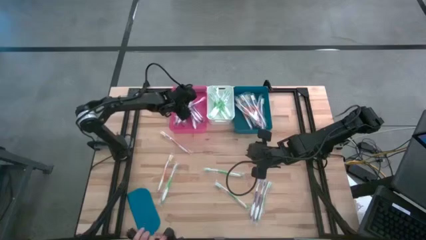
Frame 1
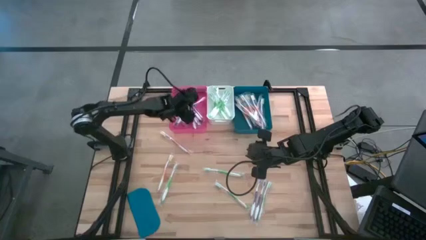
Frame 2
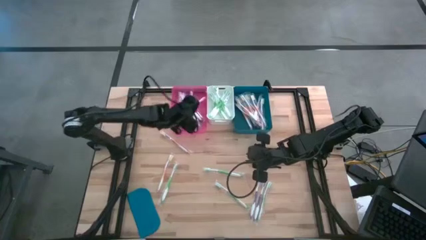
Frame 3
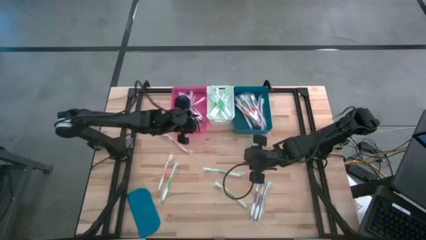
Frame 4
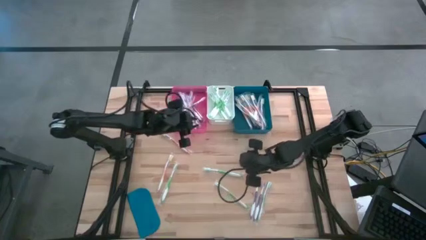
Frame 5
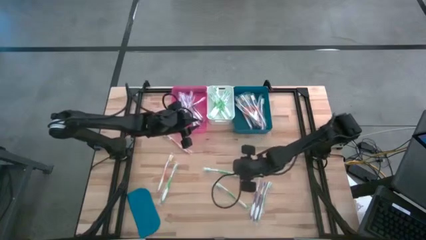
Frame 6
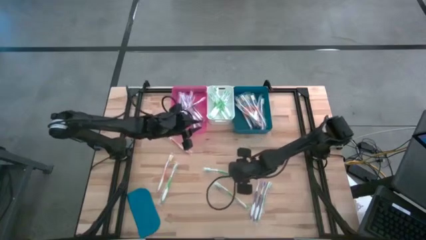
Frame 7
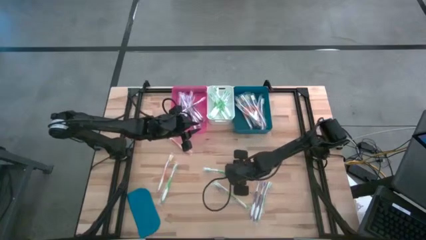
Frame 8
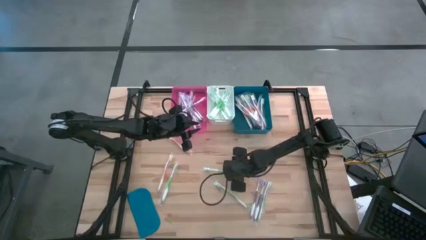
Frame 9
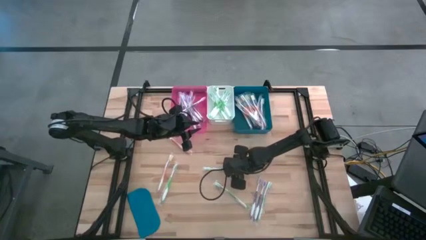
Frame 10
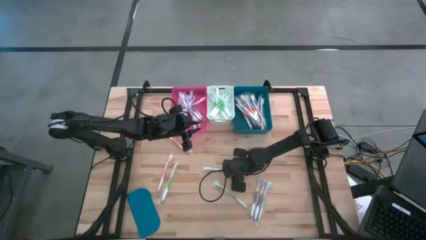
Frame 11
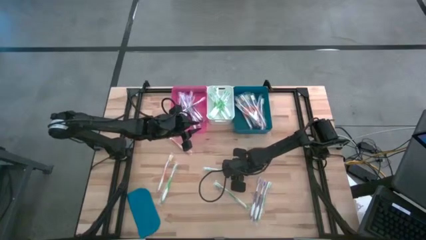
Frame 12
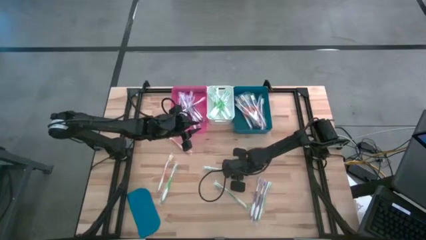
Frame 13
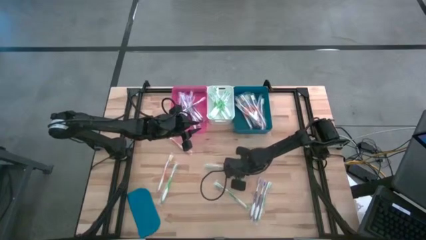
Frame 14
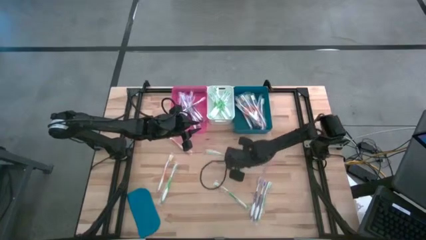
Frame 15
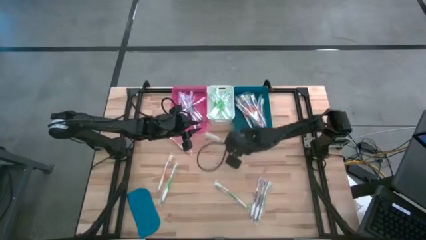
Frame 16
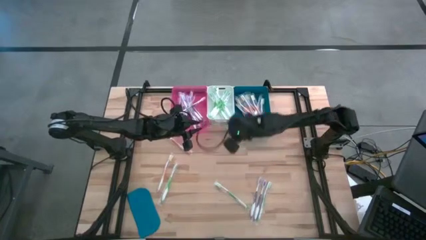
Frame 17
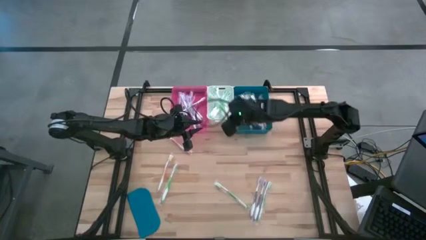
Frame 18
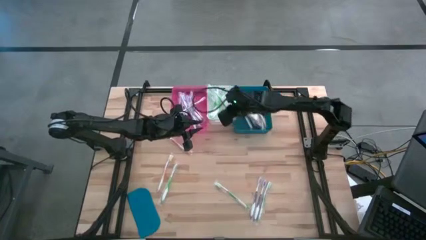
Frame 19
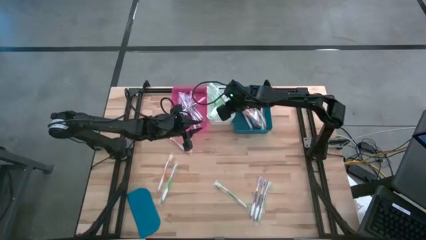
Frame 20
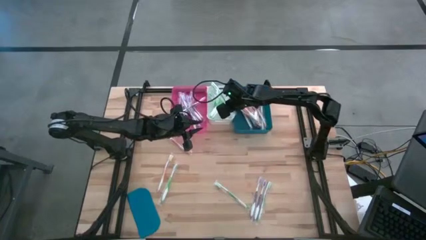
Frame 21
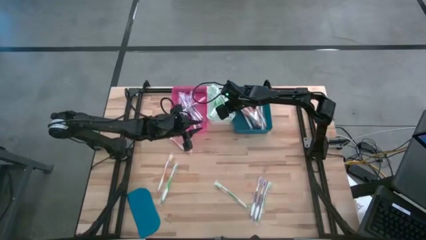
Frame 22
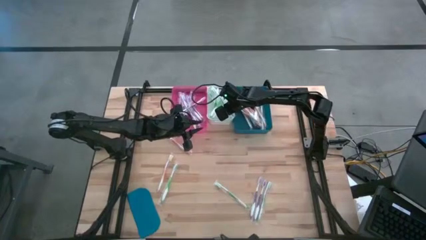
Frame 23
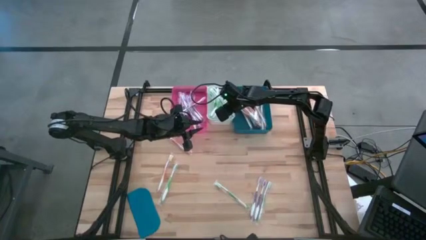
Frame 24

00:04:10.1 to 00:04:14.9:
Task: Pick & Place Toothbrushes
Put the green toothbrush into the white bin

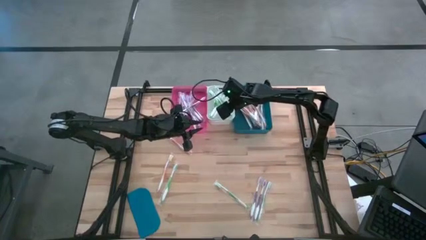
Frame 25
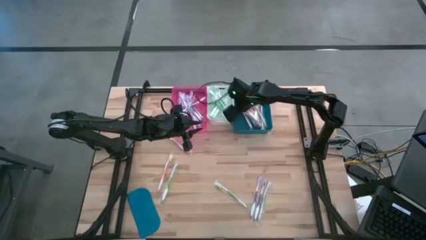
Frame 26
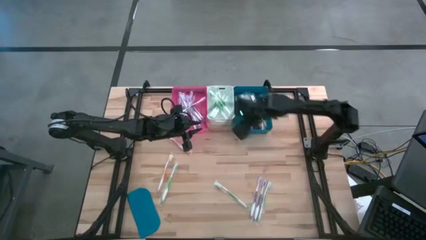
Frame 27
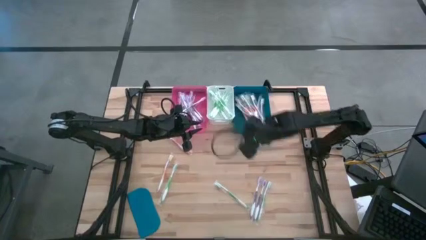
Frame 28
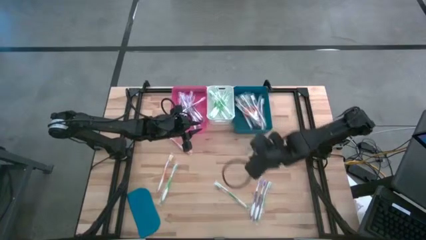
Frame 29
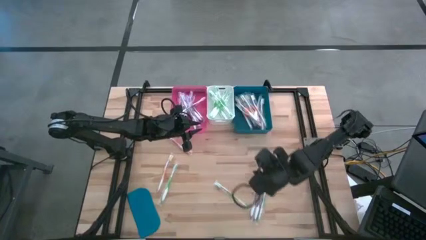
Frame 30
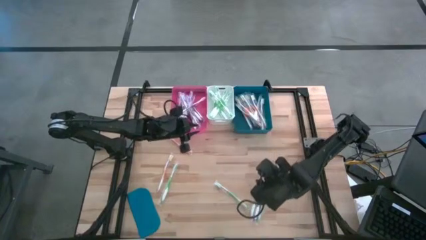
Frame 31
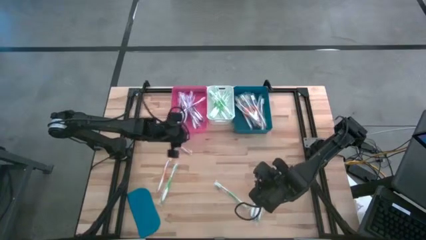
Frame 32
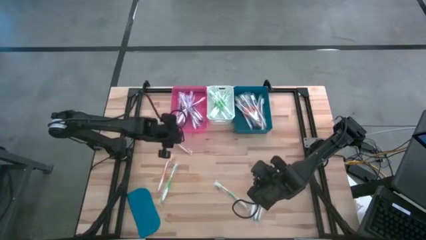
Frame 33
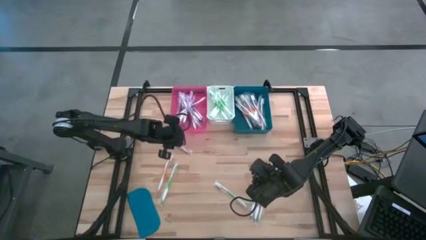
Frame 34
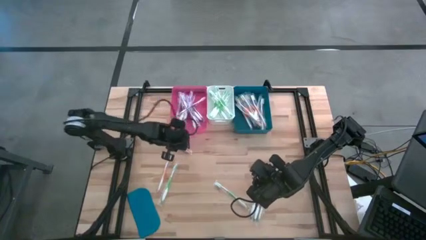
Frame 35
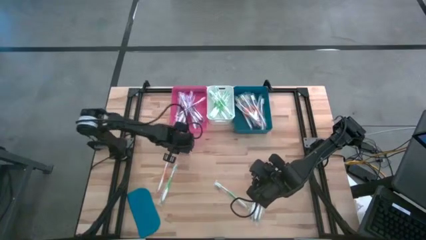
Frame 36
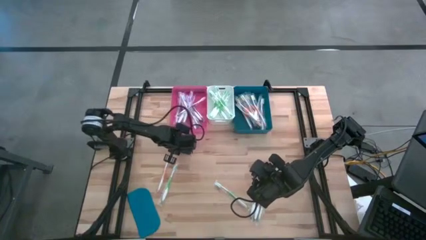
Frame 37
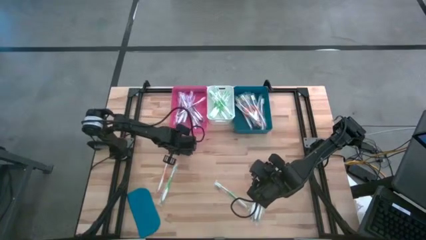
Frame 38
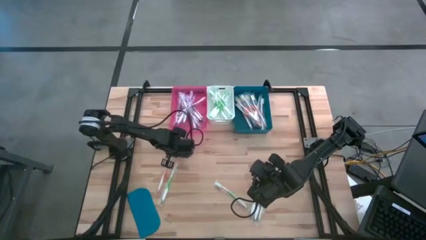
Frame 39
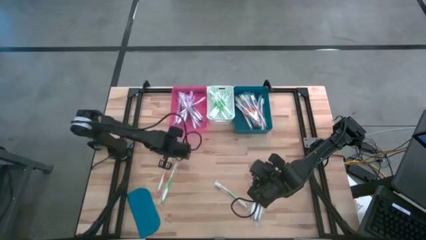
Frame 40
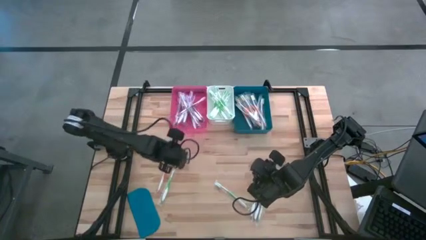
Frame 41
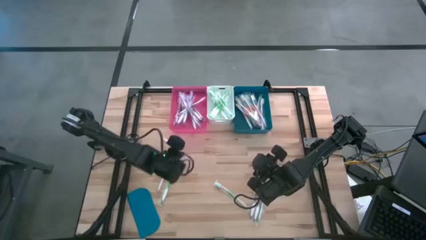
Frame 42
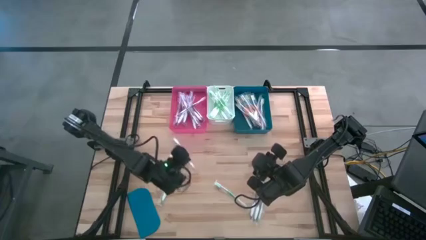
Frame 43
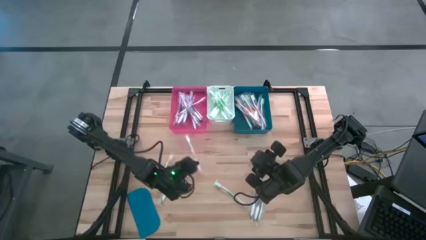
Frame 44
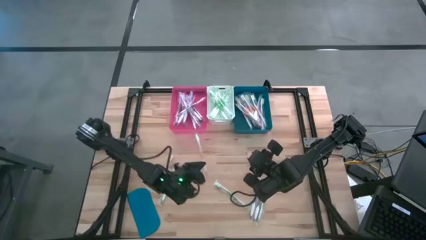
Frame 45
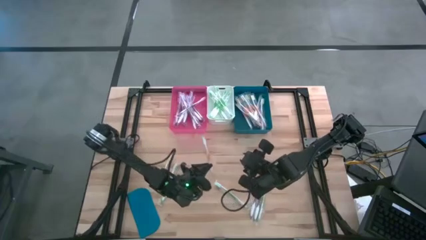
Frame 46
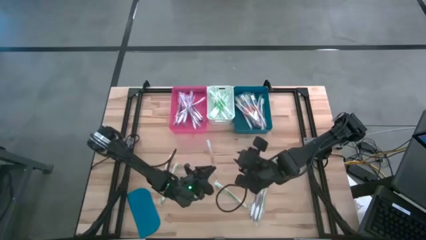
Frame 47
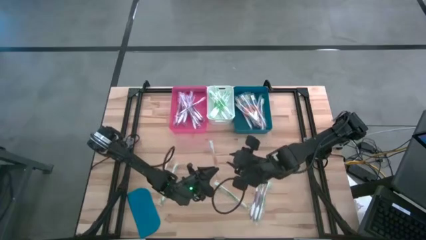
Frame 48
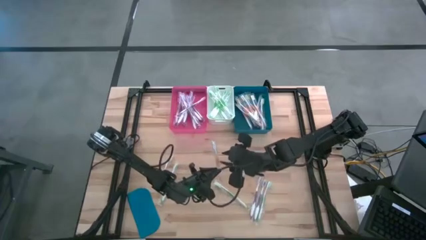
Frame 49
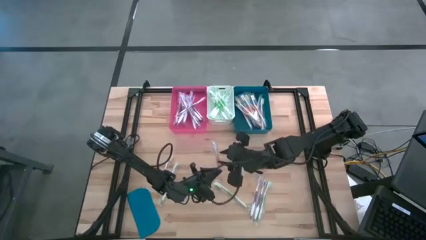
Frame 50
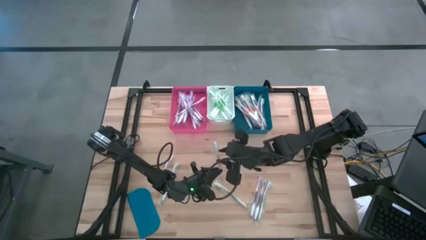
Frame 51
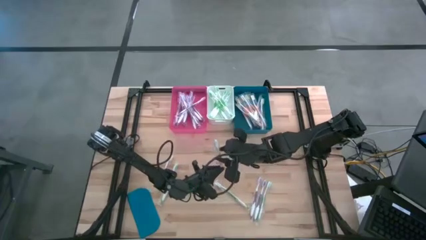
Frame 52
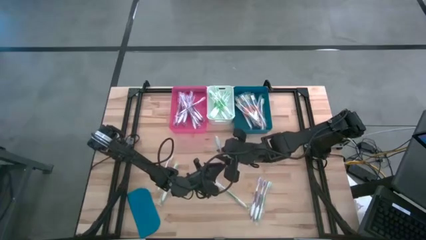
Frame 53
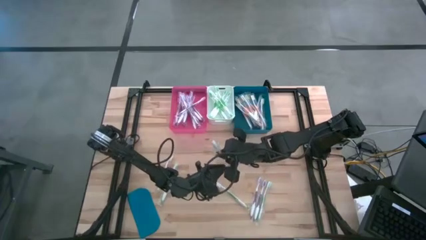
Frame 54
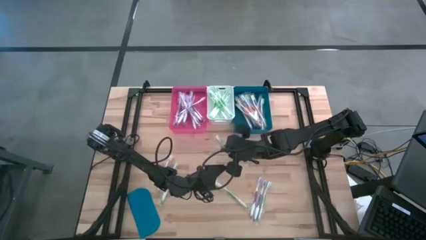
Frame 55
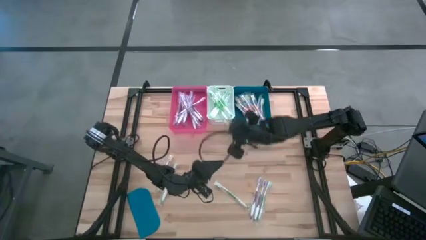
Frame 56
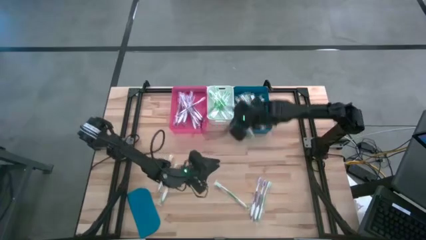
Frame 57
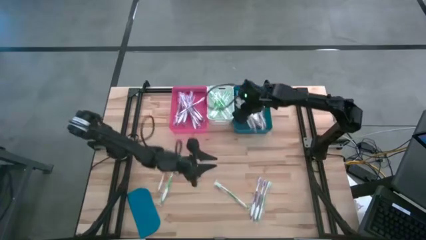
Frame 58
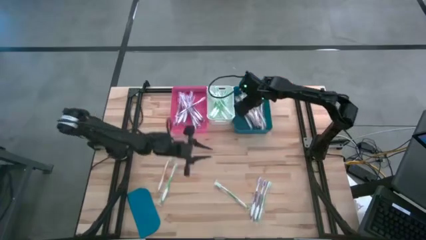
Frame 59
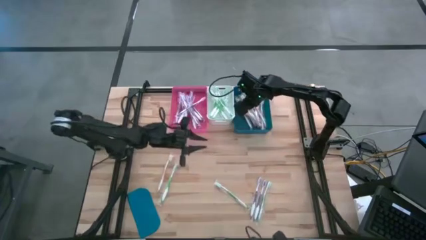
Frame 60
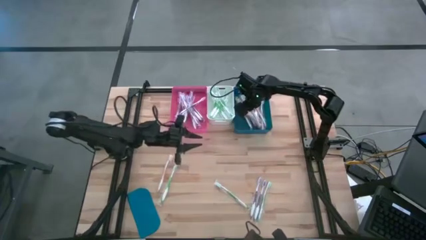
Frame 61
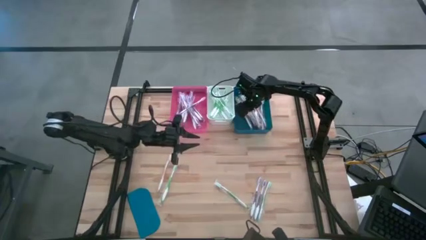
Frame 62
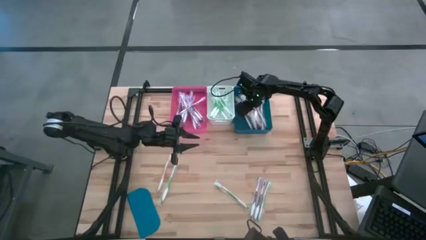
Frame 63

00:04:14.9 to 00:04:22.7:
Put the orange toothbrush into the blue bin

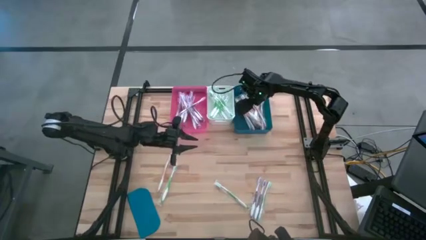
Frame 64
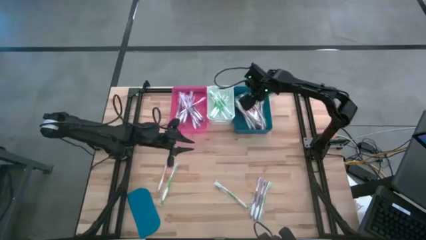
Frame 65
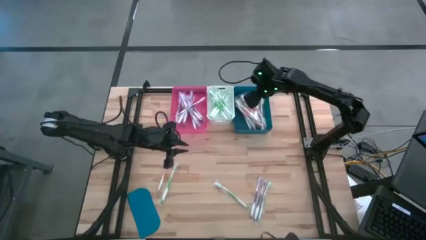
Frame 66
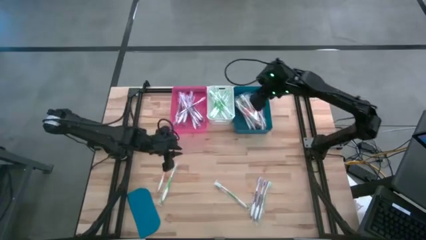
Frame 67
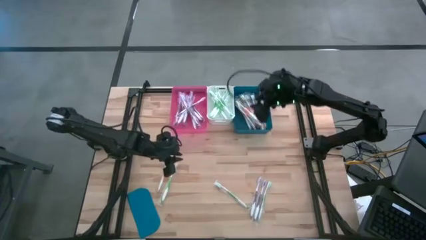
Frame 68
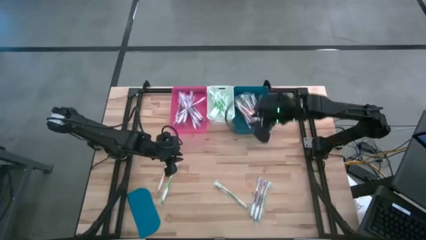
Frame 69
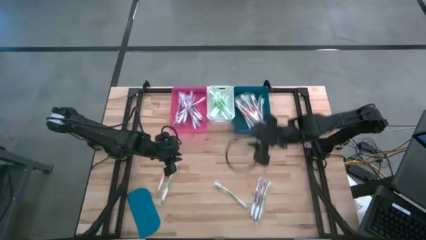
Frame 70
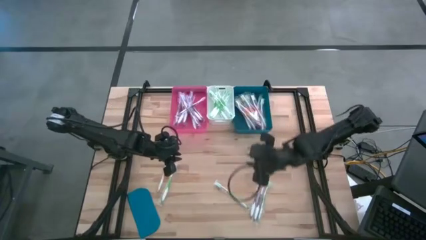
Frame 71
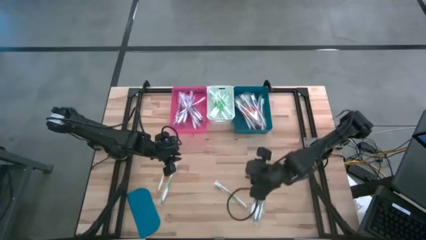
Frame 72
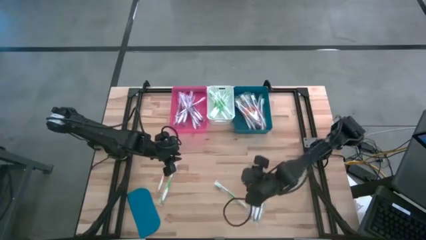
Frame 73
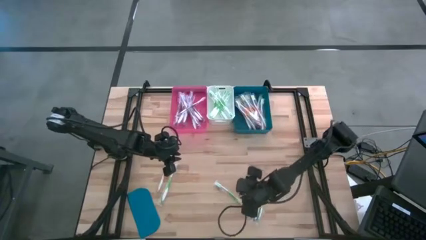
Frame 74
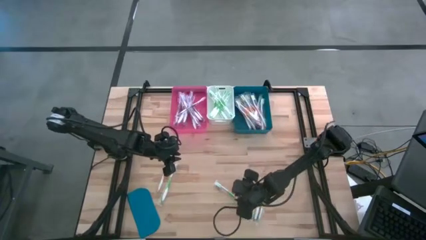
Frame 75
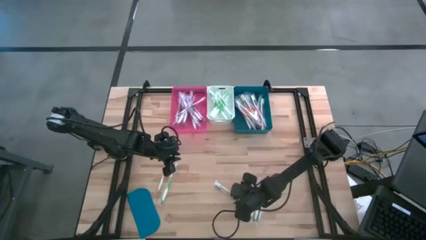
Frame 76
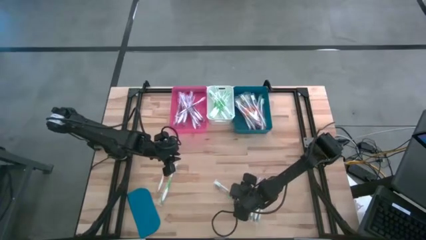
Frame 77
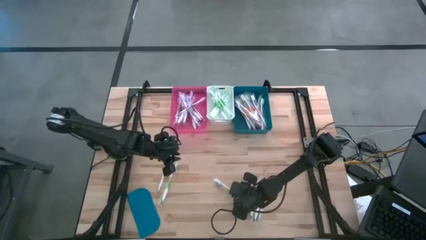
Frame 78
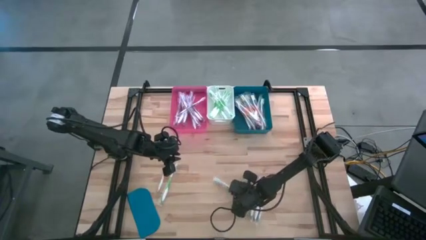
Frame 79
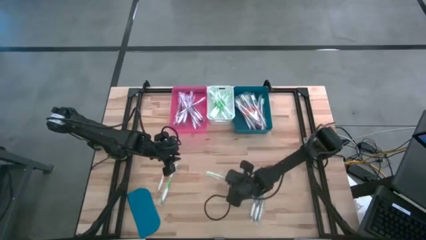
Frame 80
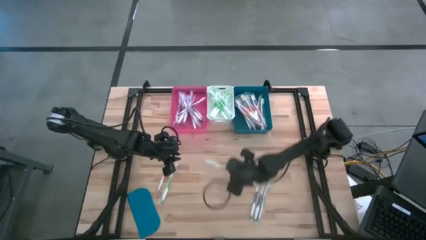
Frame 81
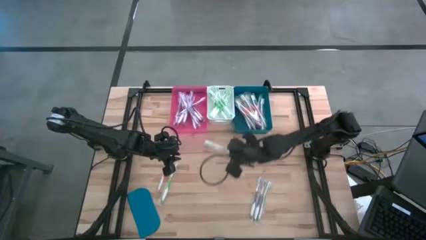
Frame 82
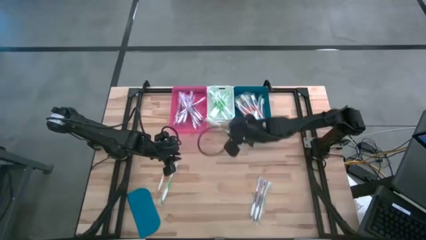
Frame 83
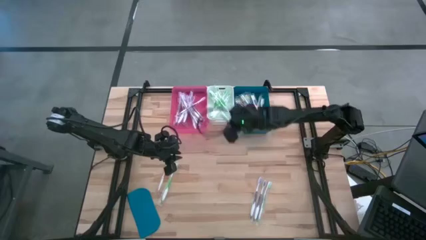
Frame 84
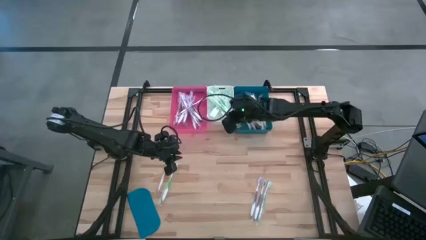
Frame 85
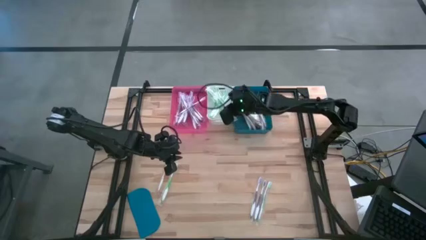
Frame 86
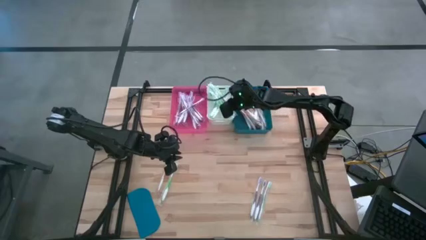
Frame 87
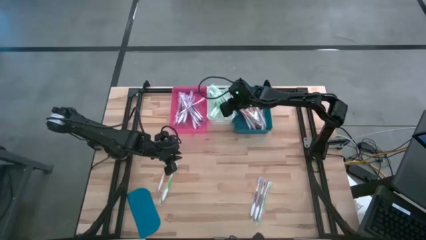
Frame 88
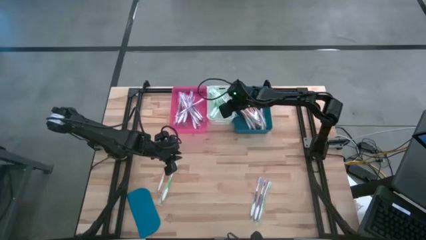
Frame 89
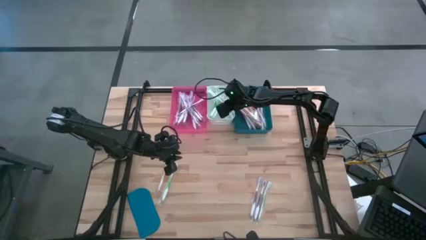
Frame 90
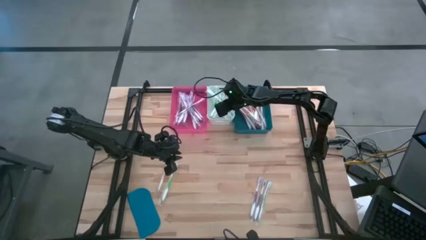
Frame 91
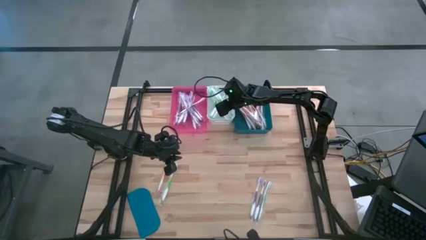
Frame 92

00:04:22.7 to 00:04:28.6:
Put the green toothbrush into the white bin
